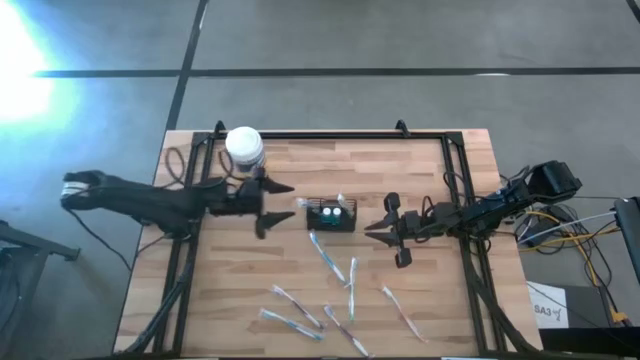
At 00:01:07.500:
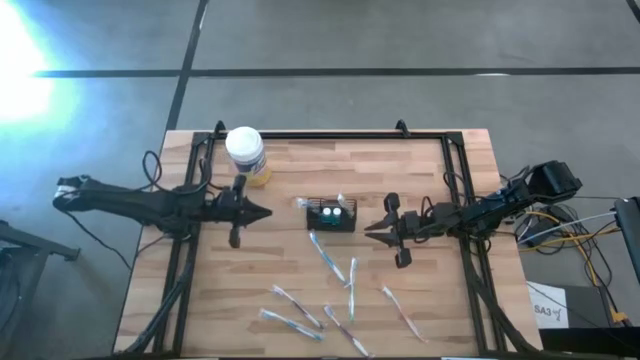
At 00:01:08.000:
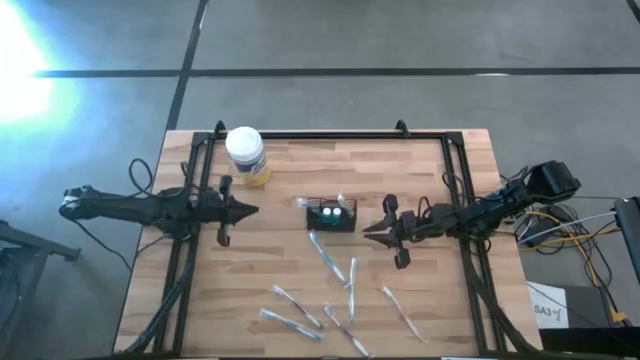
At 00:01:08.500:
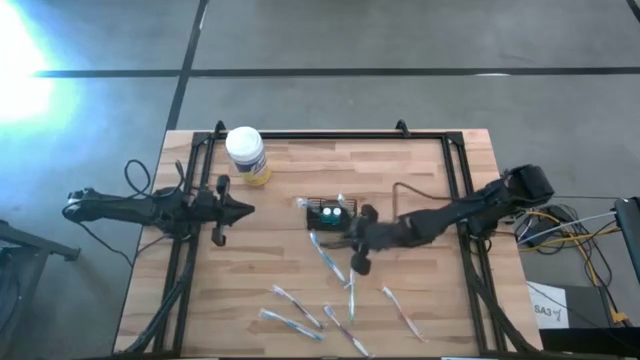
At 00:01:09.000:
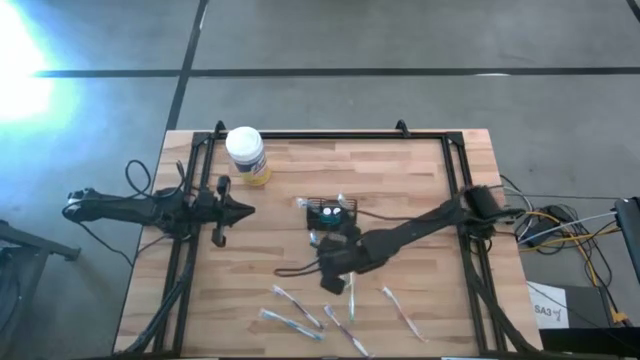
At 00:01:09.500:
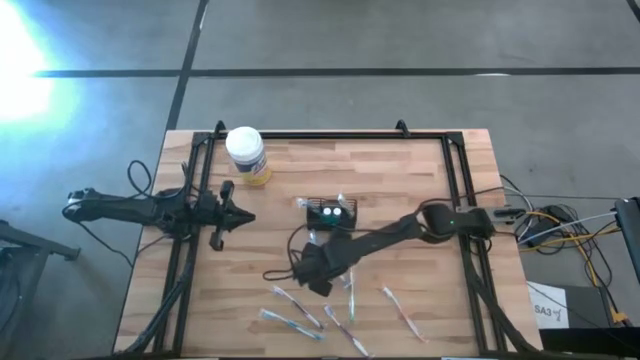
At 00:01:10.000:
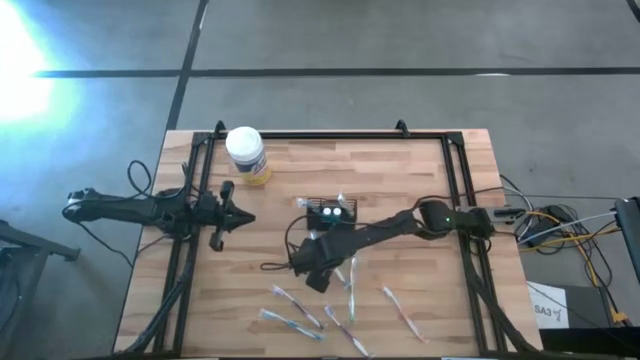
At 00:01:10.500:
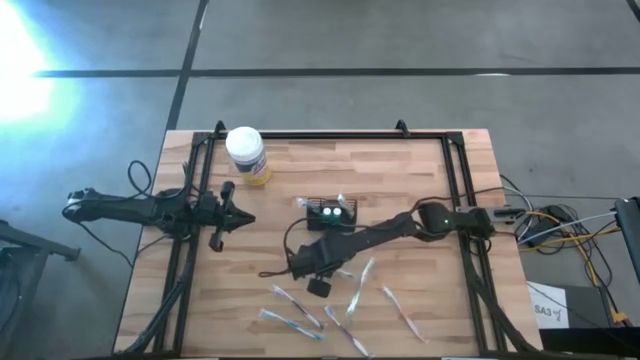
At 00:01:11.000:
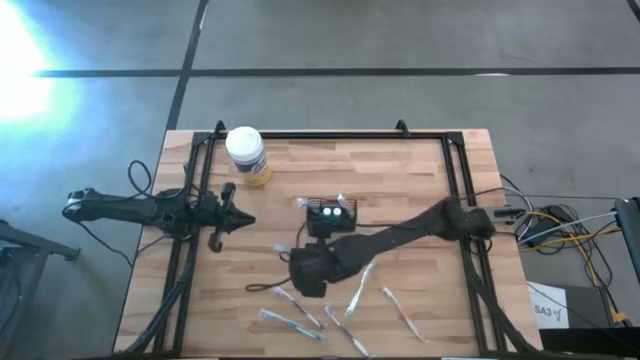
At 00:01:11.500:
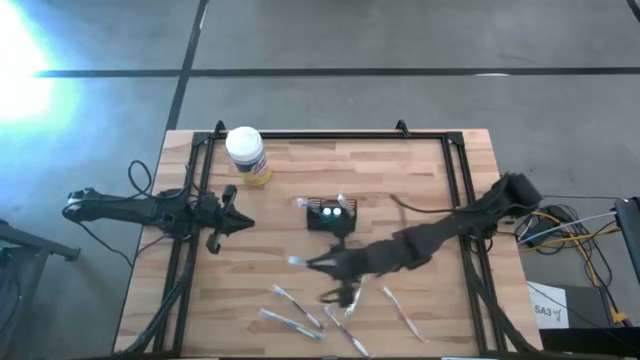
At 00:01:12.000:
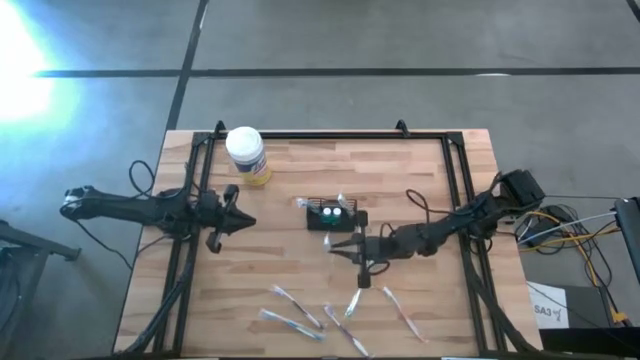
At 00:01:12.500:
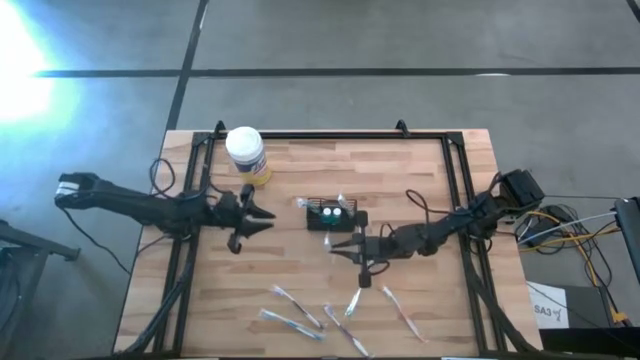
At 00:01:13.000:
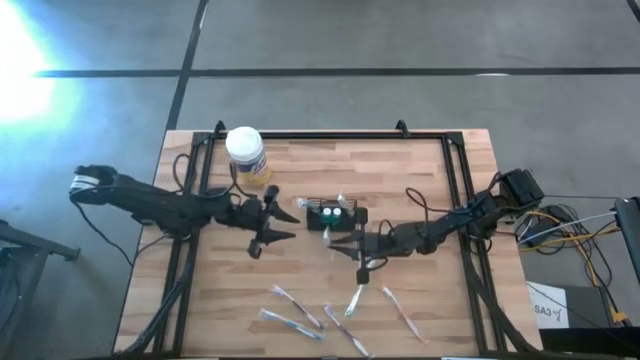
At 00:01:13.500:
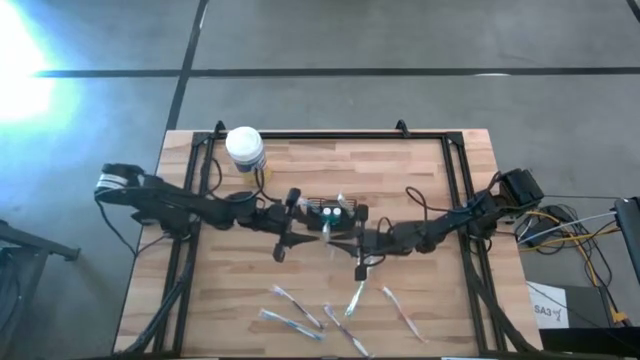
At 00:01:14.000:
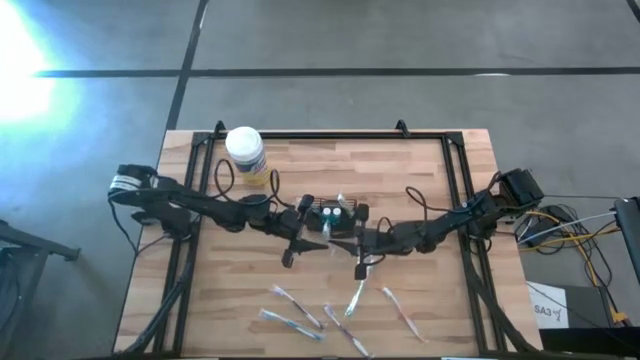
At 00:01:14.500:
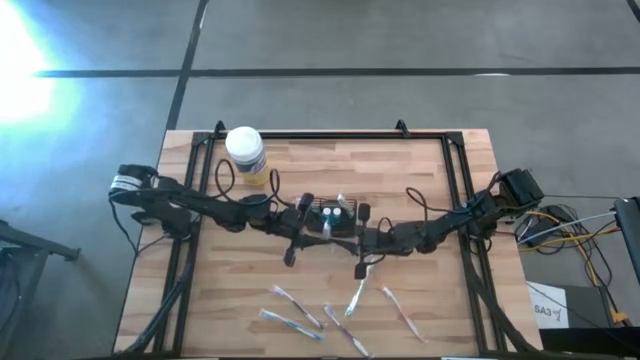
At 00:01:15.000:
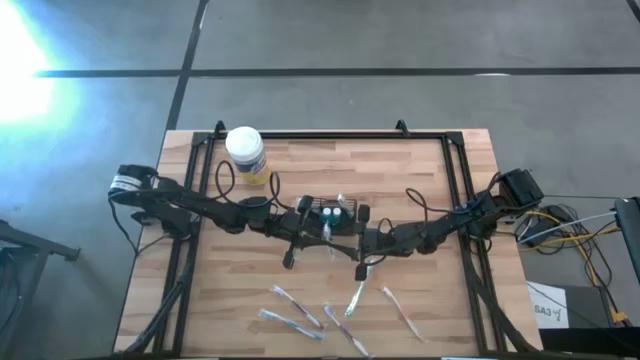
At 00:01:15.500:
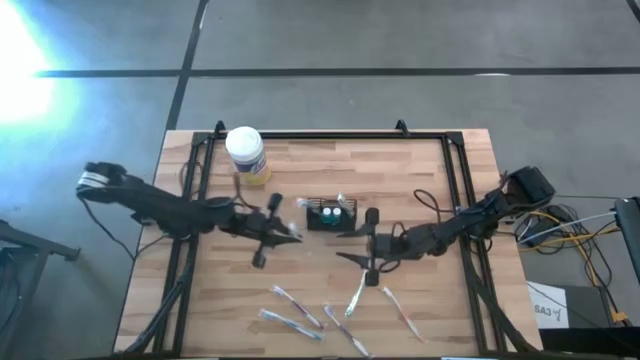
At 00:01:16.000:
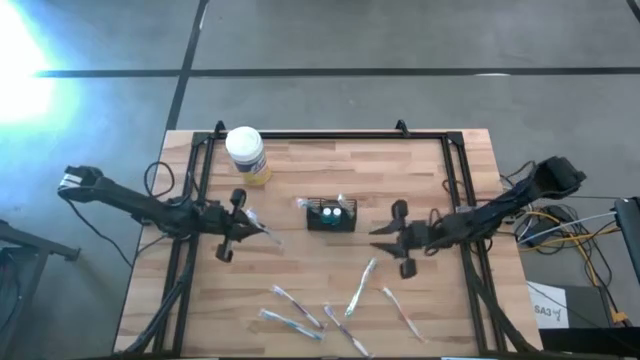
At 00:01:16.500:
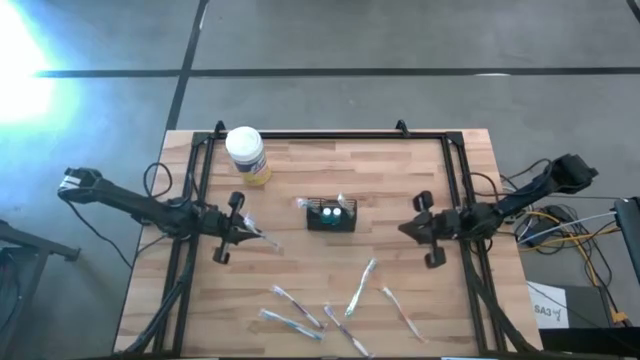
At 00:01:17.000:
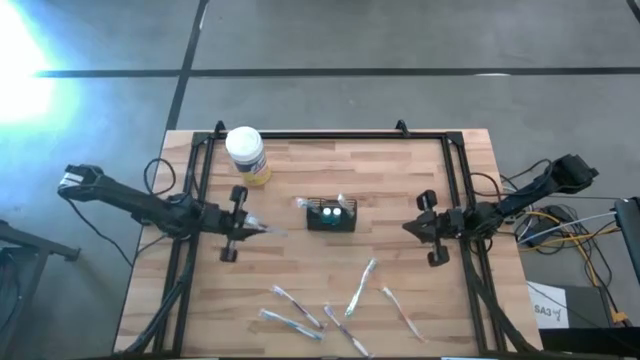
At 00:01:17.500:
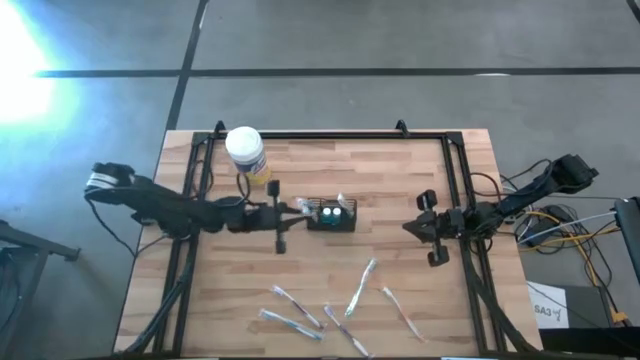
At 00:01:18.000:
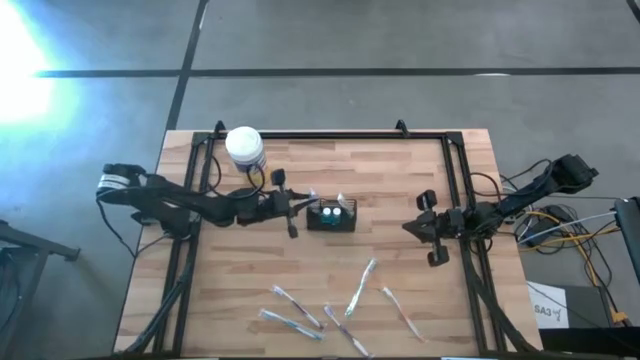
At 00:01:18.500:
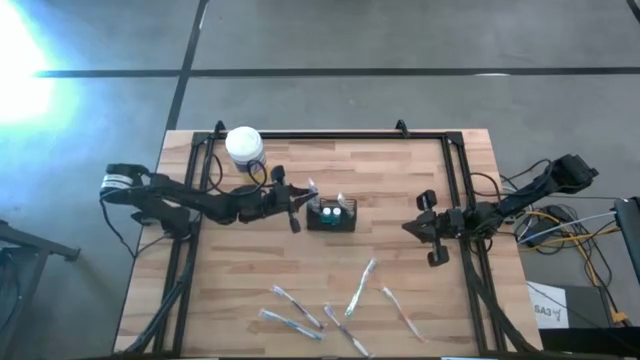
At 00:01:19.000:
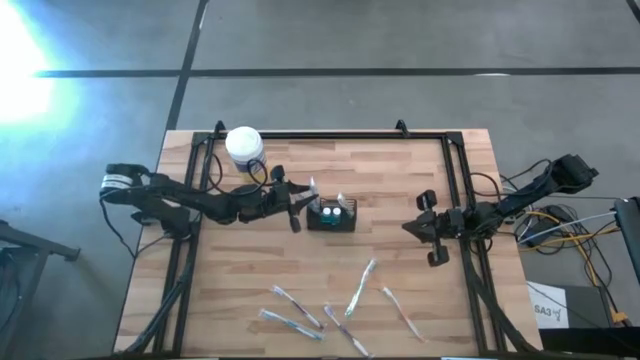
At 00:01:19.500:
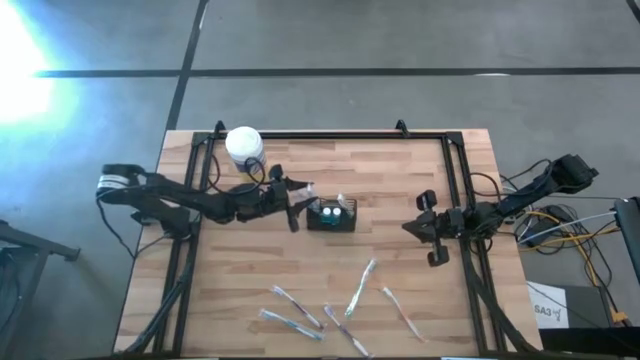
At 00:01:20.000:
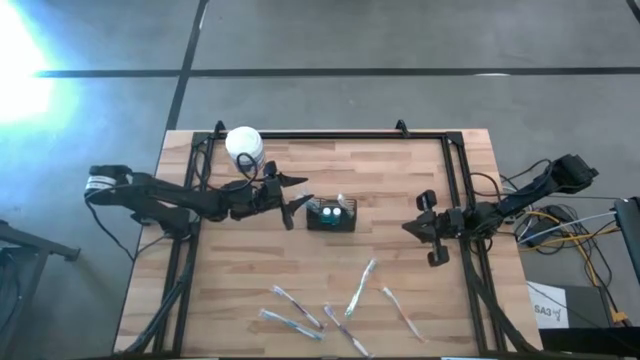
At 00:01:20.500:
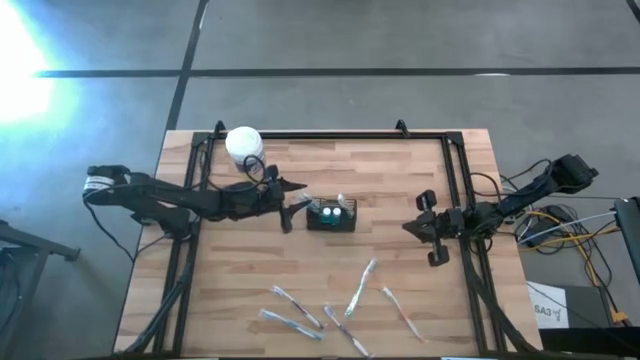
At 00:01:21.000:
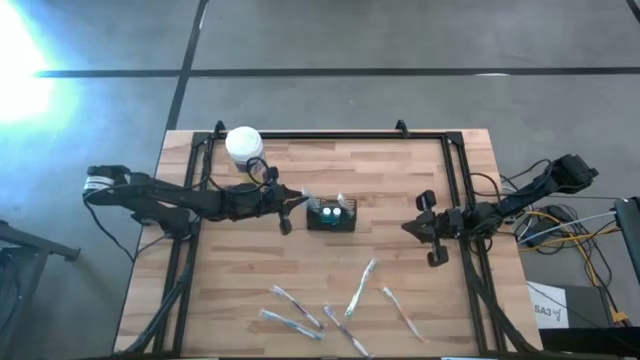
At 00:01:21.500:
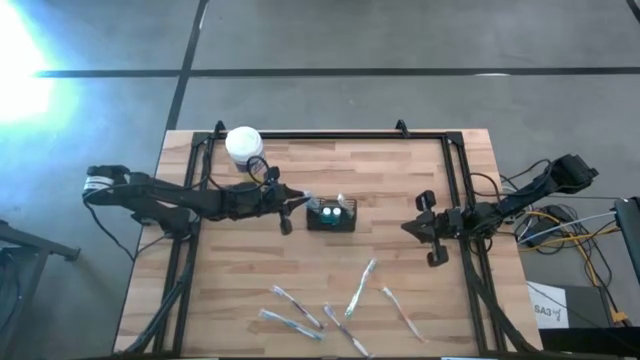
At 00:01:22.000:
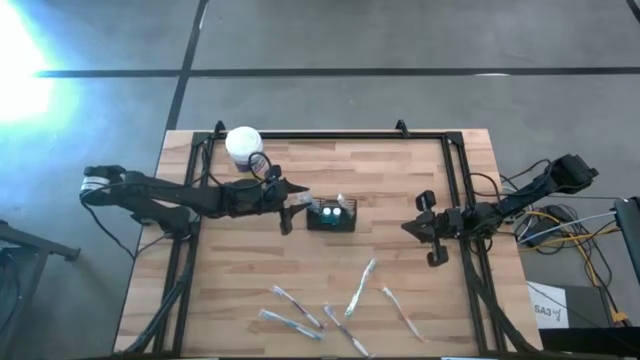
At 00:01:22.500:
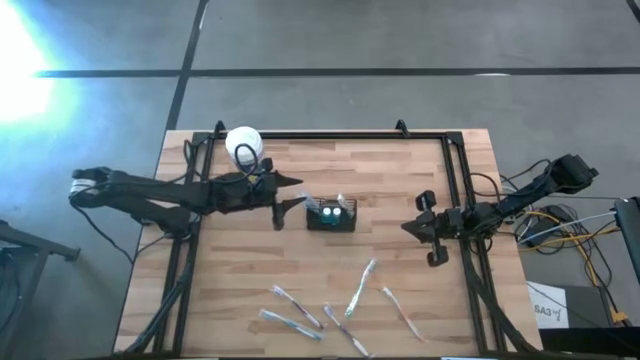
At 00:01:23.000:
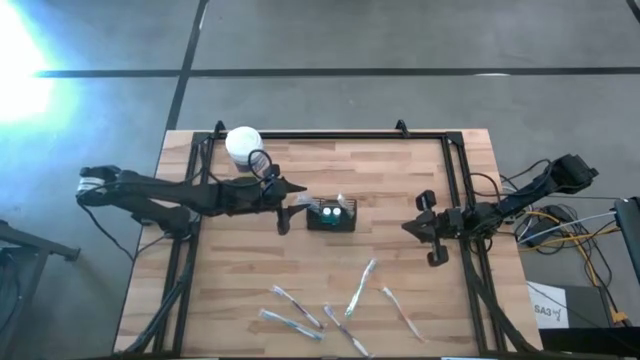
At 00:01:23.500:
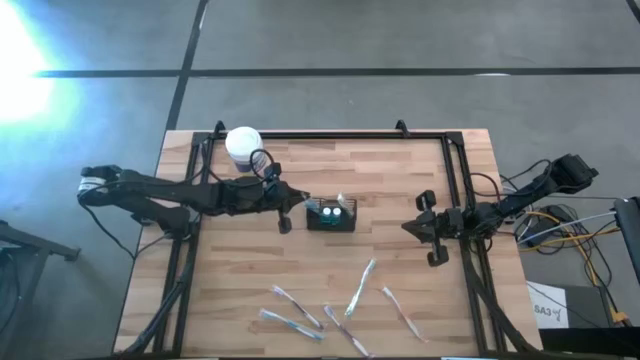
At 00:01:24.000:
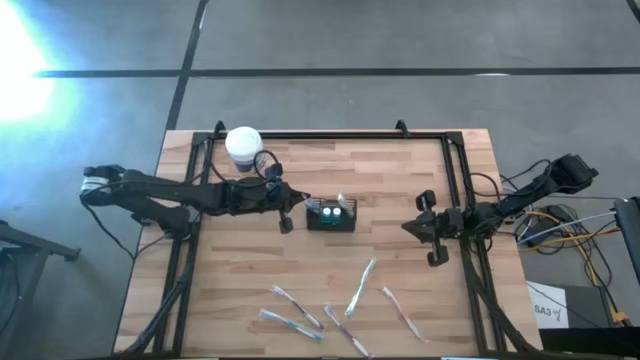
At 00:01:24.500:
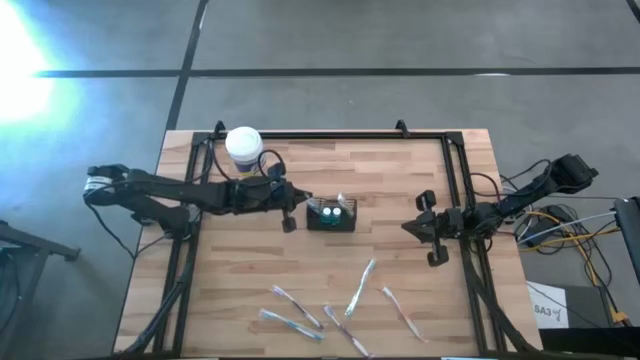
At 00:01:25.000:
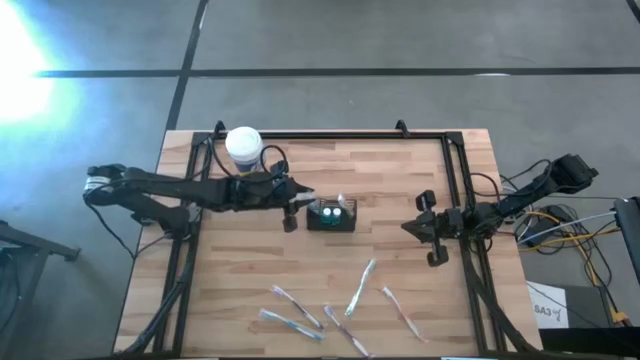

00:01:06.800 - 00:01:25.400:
Task: Pick & Place toothbrushing station
Put the top blue toothbrush into the black mesh organizer
